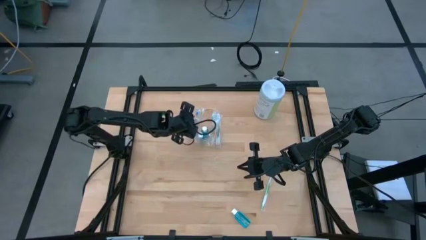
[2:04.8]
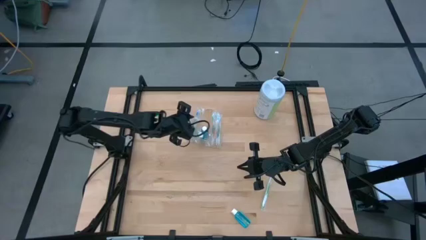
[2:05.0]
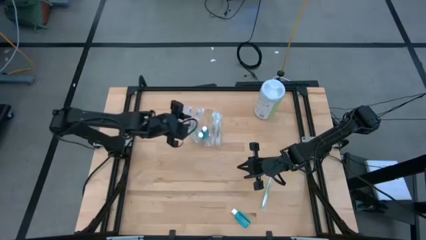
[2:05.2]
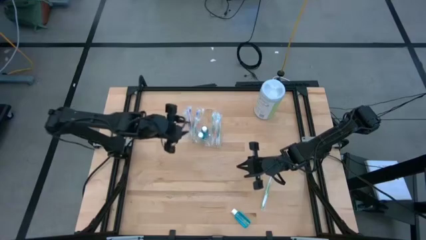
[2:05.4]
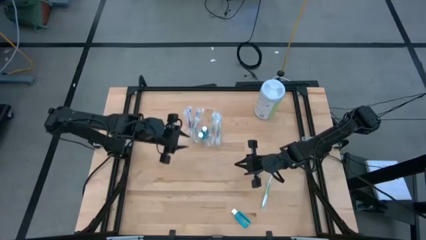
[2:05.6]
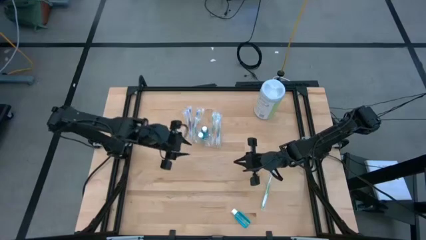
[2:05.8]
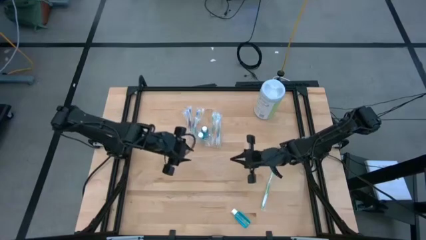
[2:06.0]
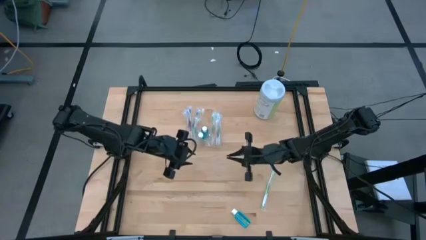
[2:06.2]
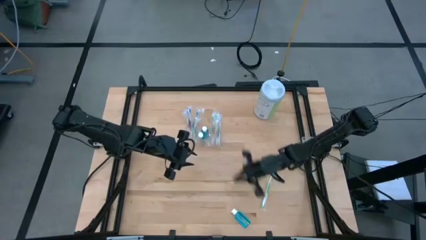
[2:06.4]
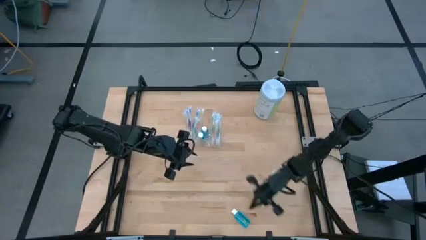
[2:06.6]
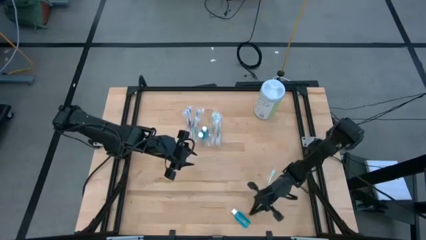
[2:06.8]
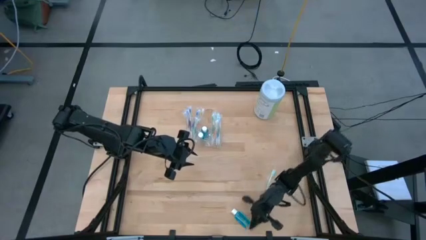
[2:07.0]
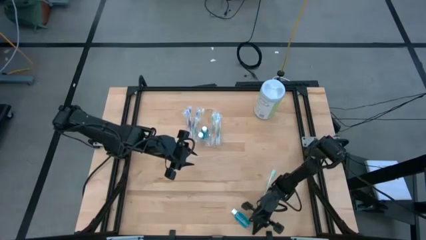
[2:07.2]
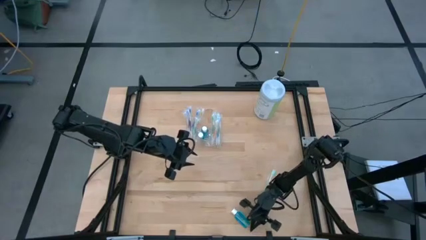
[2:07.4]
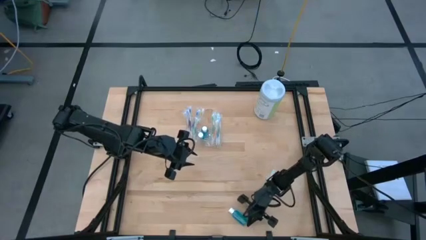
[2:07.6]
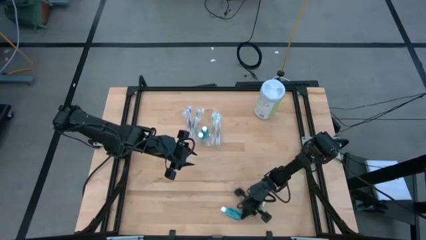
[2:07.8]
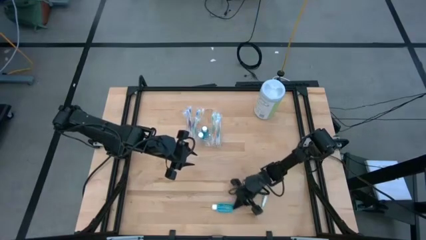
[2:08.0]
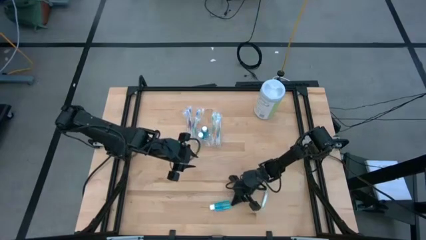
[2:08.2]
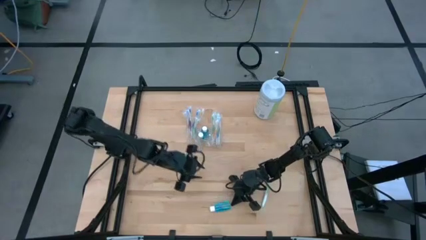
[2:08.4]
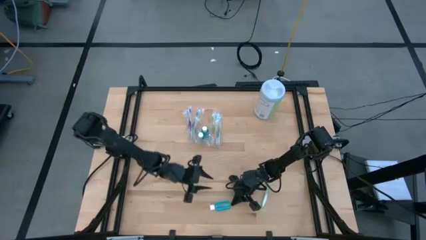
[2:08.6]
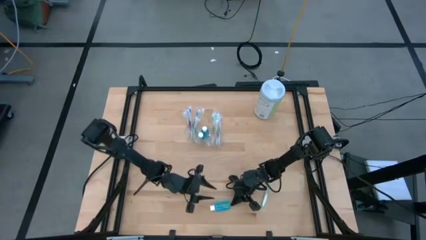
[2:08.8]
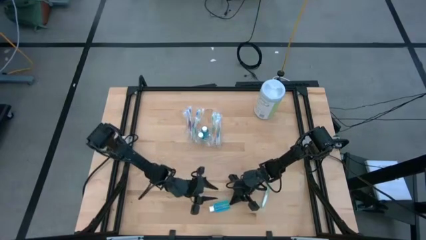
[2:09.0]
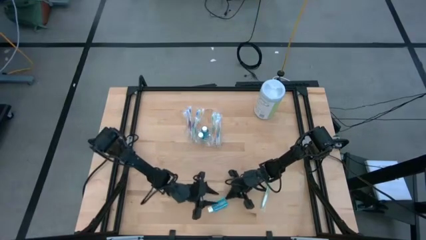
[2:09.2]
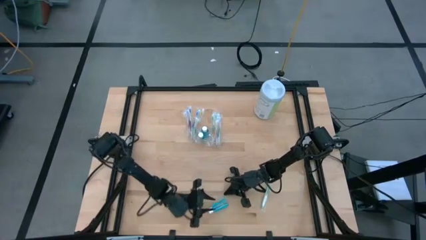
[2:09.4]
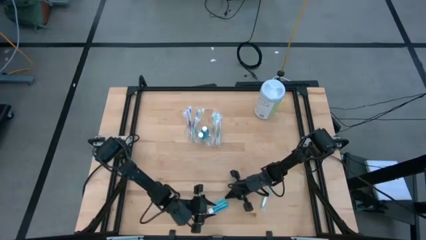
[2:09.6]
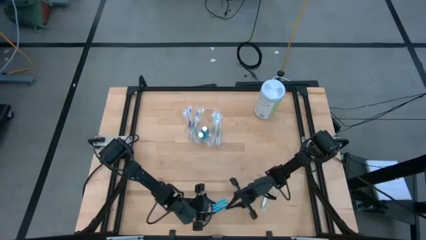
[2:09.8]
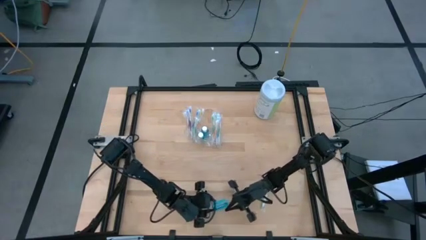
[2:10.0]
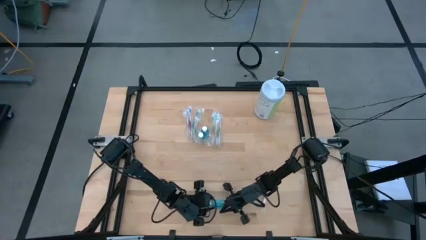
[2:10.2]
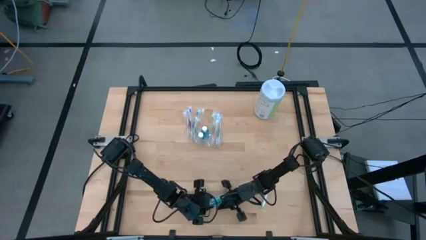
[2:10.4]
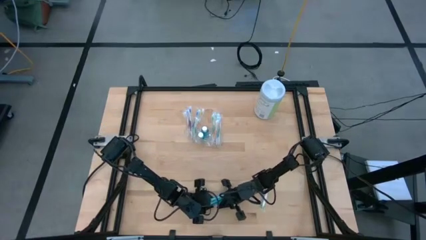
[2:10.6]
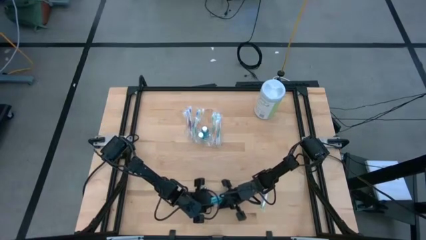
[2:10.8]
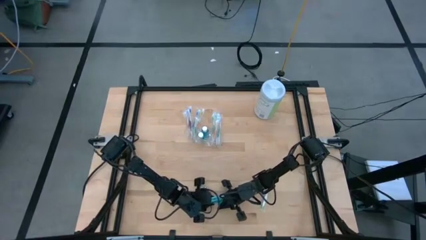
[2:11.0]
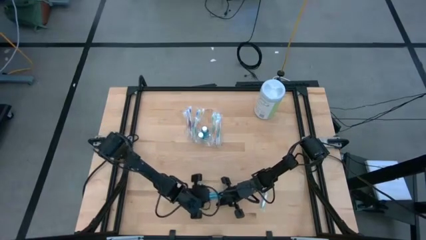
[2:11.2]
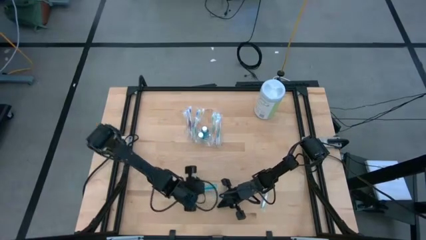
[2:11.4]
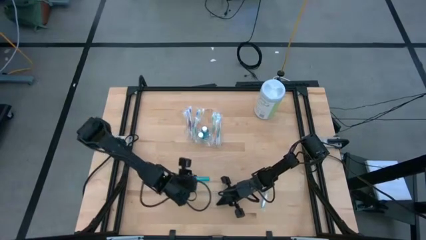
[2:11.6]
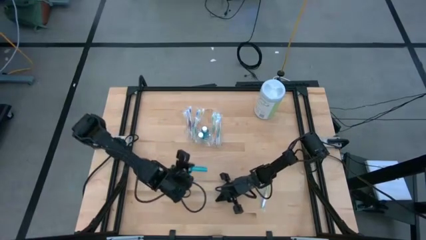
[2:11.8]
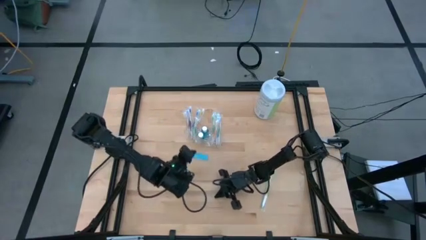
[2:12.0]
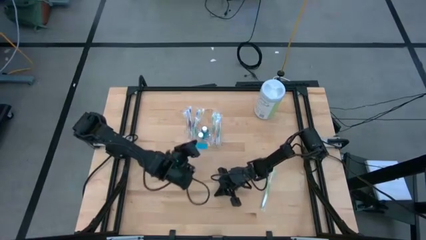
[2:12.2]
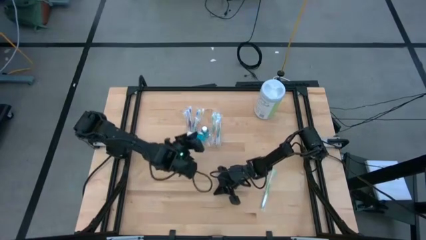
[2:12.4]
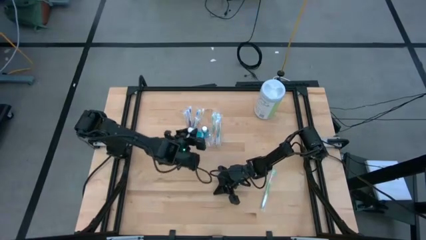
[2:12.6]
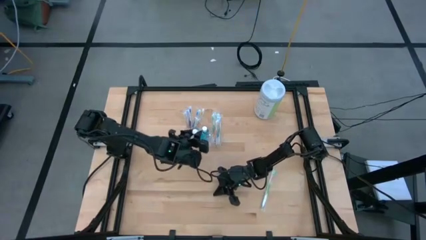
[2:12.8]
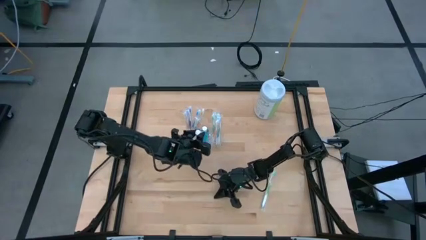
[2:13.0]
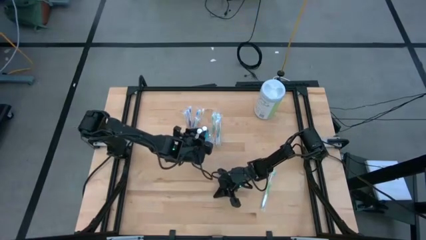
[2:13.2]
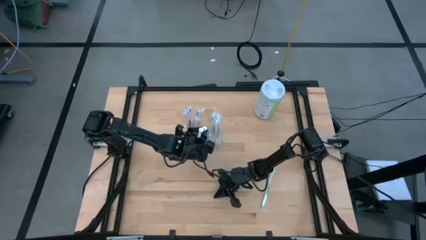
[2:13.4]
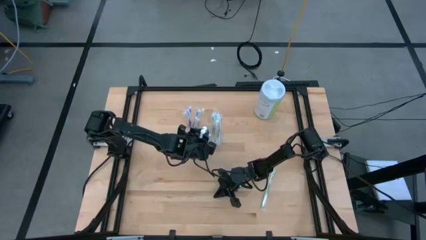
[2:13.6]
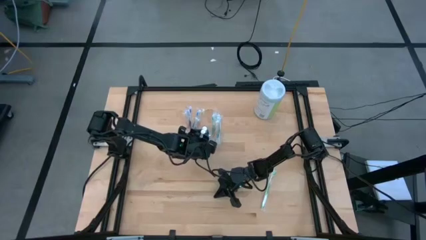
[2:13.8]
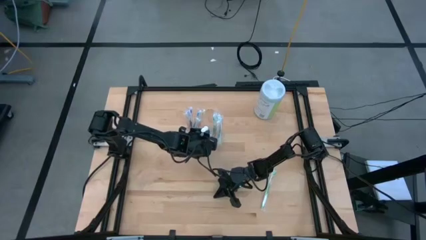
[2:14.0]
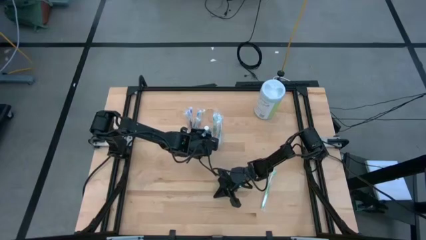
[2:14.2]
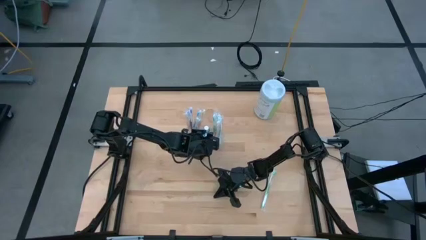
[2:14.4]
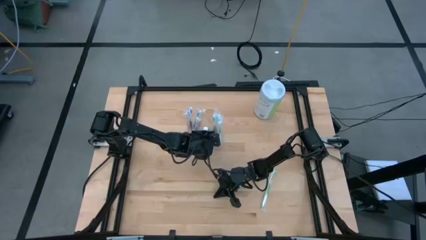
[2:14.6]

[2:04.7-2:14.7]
Task: Pick & Place toothbrushing station
Put the mouthwash into the transparent organizer

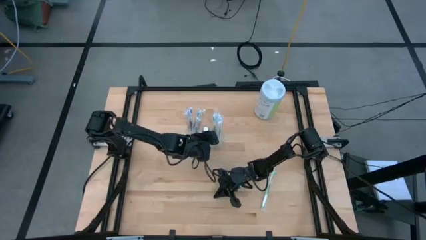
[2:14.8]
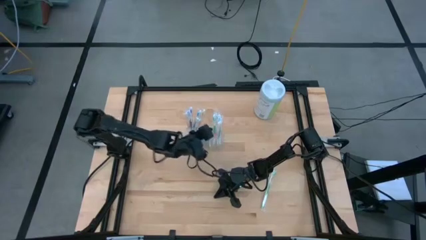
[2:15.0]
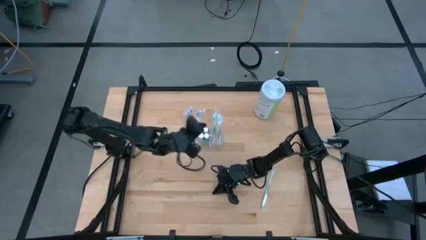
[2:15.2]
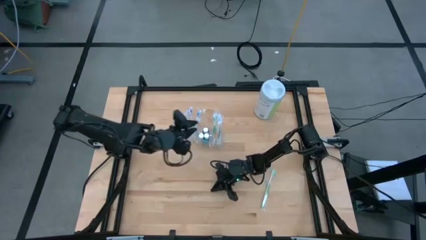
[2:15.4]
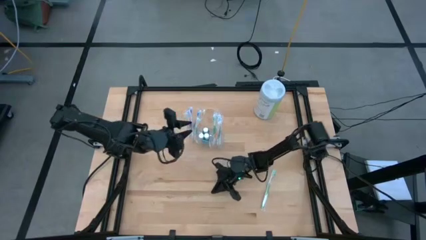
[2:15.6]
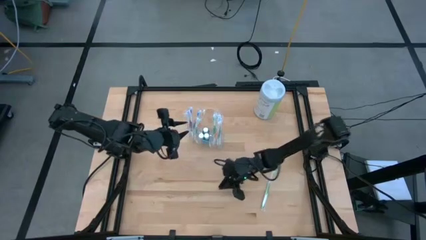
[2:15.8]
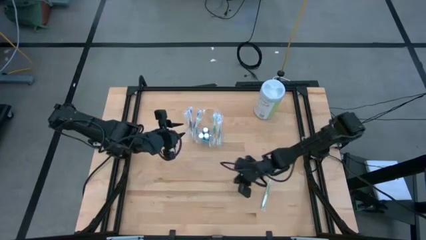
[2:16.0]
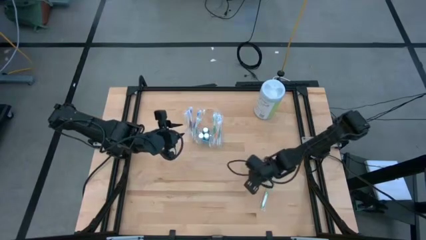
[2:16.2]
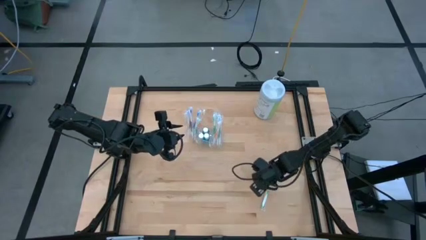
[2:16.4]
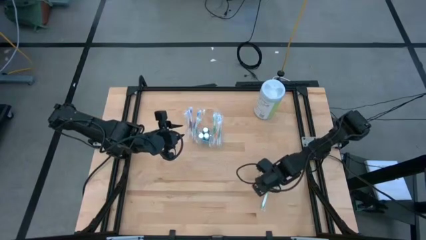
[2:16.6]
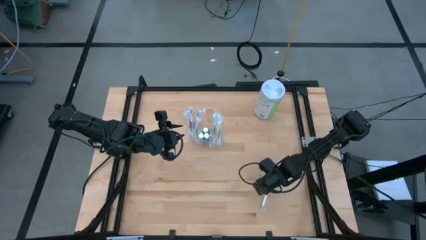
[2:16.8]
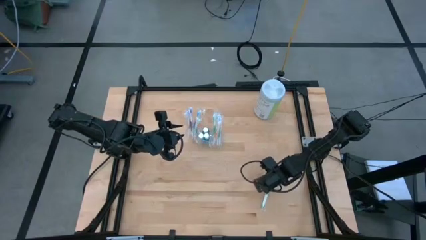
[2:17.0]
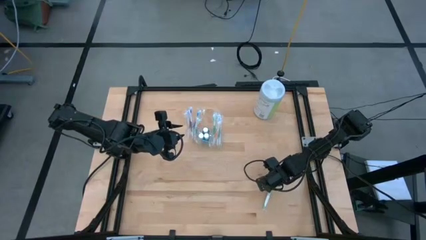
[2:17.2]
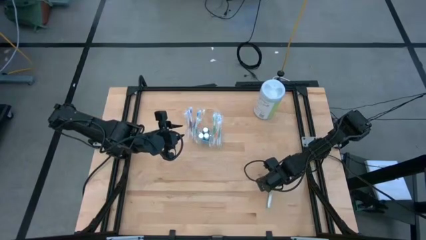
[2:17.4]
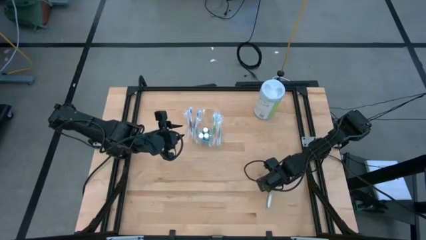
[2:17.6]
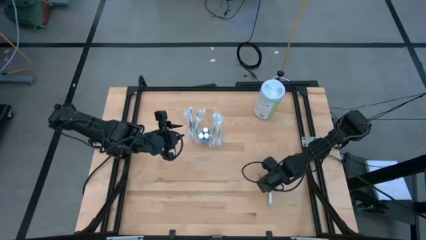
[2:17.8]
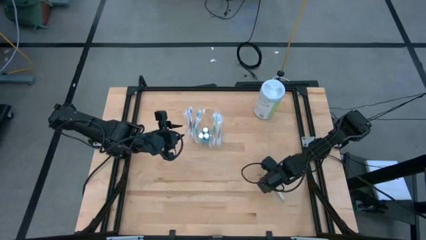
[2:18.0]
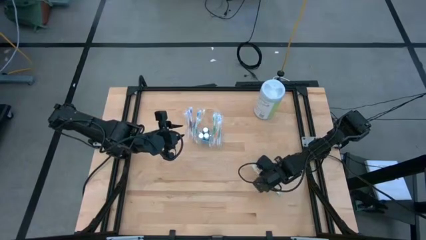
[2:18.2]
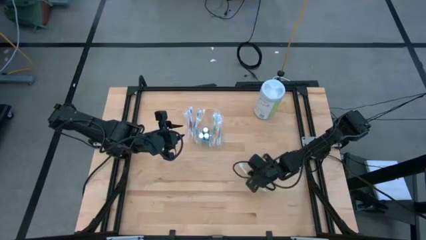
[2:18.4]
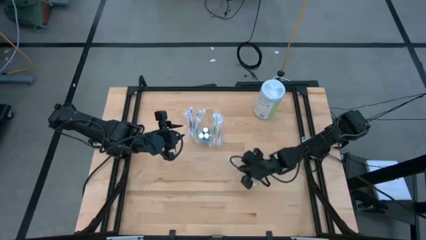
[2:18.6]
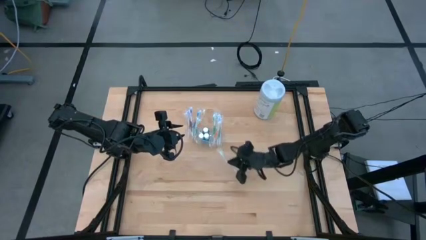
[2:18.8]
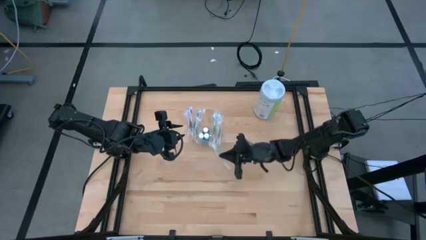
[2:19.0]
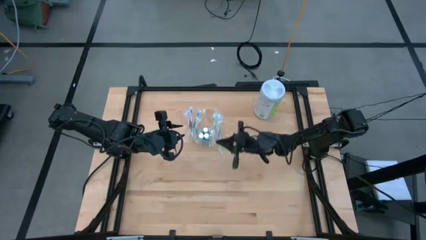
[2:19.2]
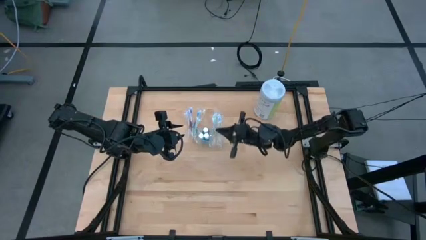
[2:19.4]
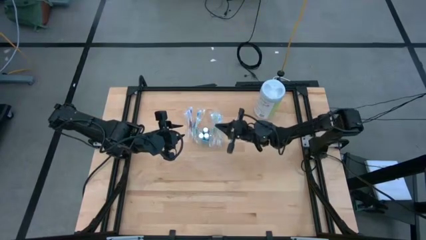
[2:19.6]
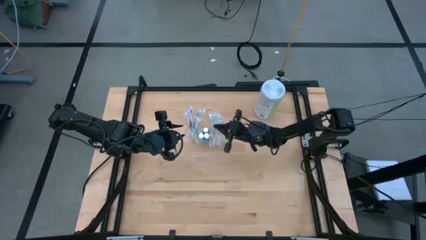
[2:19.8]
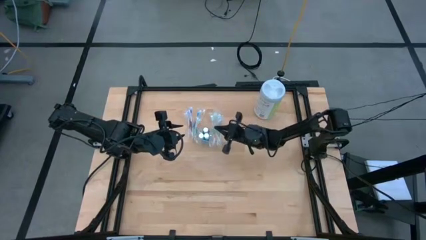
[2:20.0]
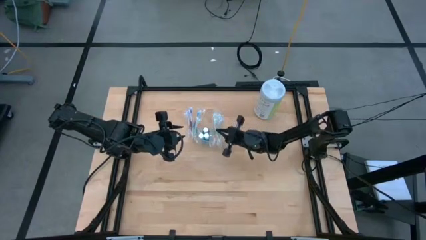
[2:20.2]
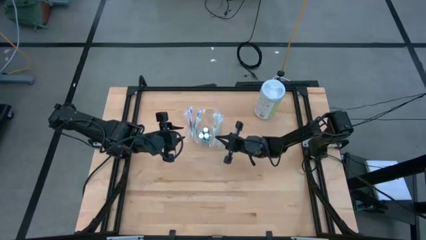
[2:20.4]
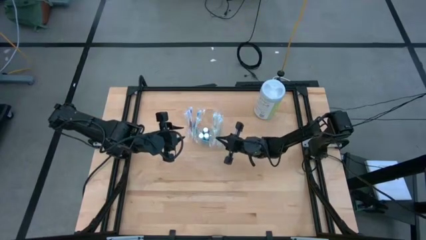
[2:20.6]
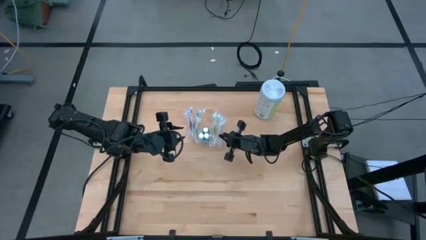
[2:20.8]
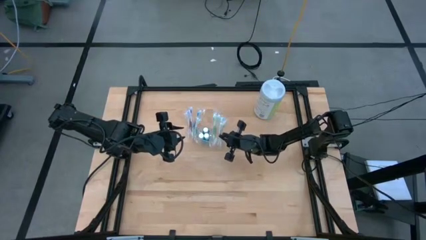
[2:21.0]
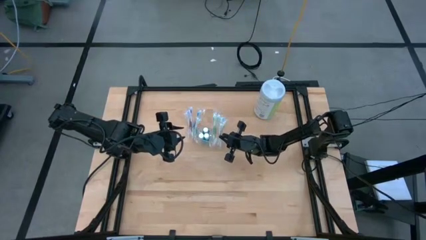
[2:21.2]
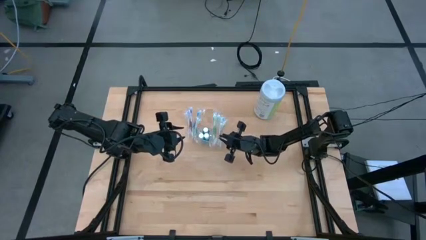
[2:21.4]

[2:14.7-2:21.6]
Put the green toothbrush into the transparent organizer
